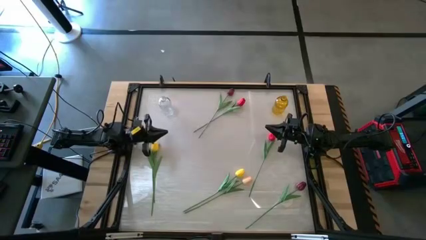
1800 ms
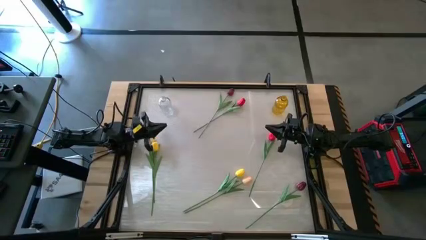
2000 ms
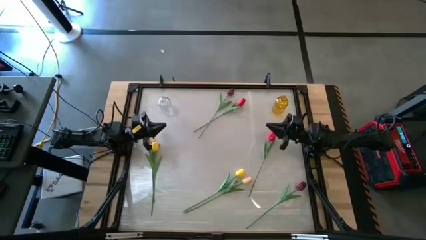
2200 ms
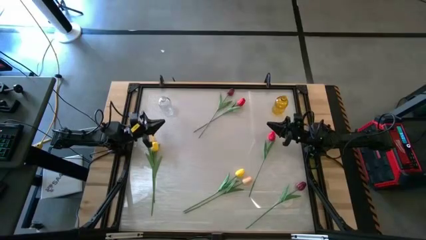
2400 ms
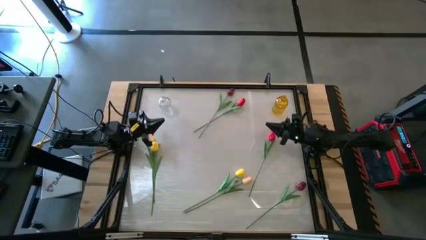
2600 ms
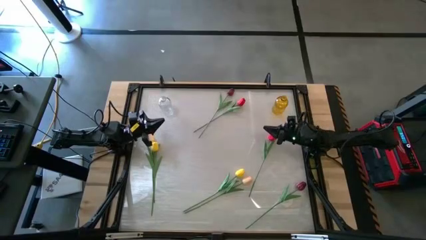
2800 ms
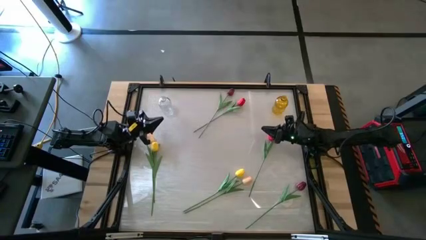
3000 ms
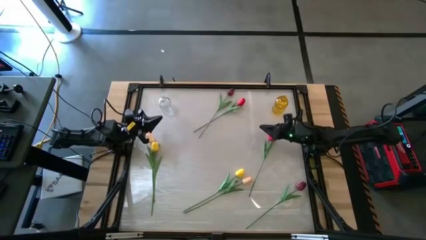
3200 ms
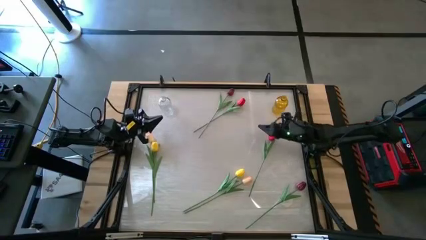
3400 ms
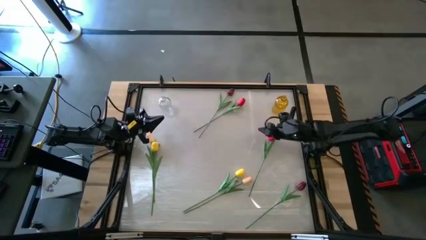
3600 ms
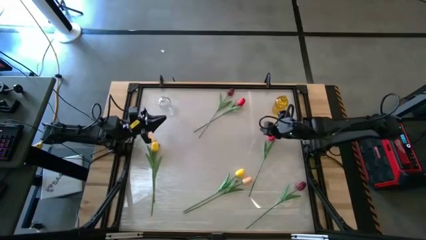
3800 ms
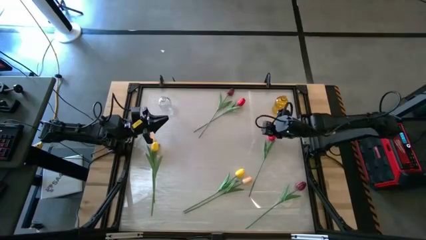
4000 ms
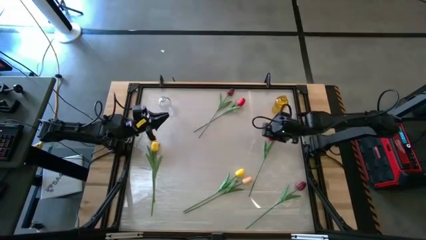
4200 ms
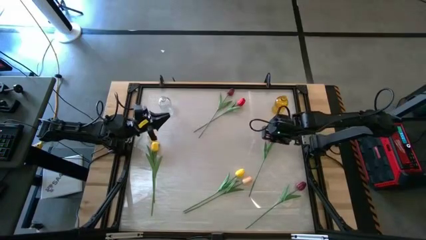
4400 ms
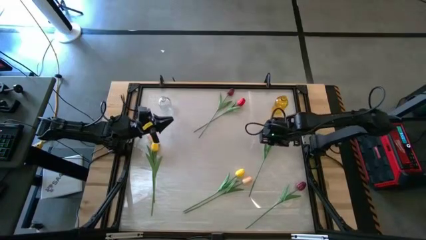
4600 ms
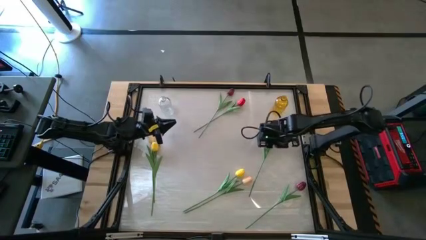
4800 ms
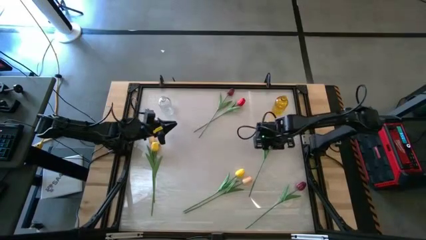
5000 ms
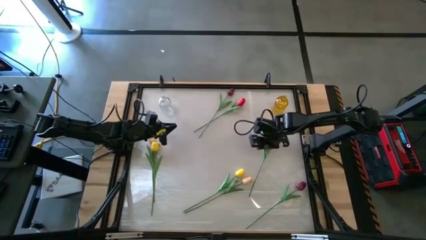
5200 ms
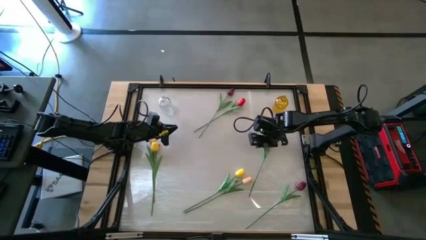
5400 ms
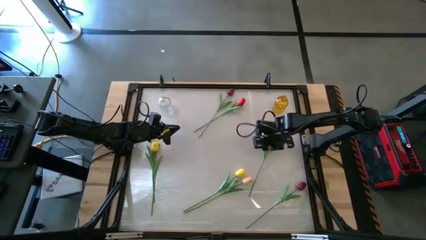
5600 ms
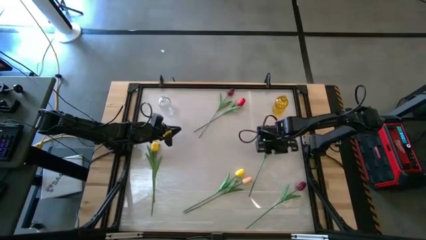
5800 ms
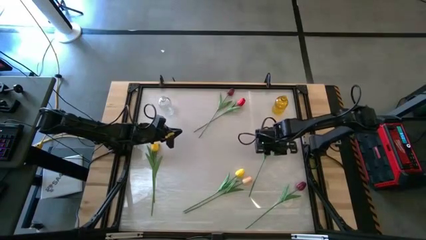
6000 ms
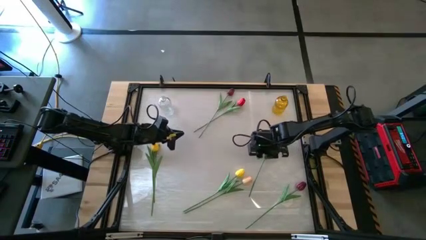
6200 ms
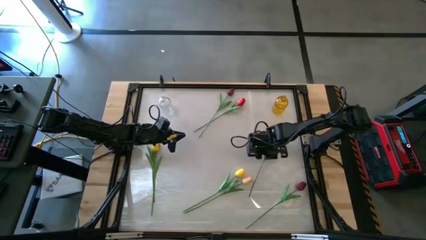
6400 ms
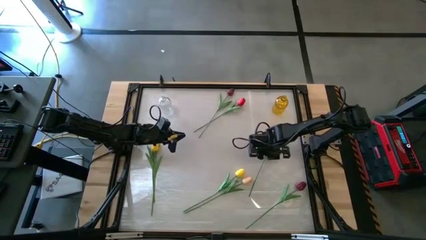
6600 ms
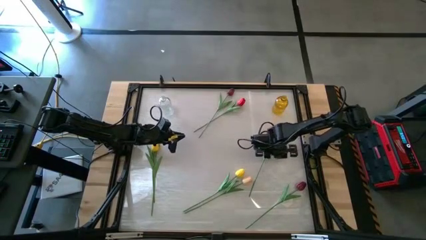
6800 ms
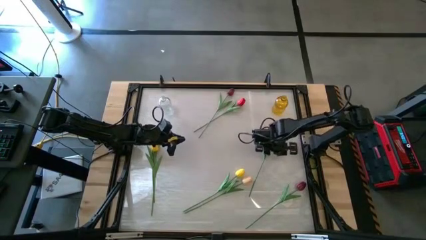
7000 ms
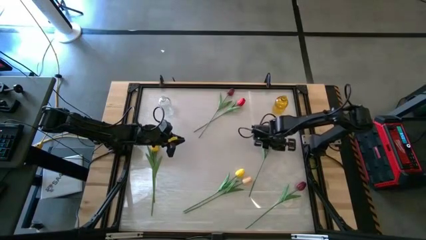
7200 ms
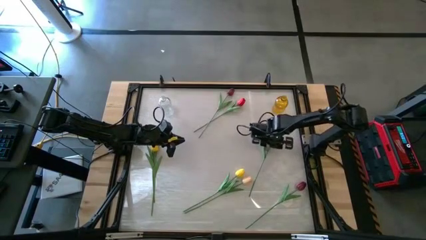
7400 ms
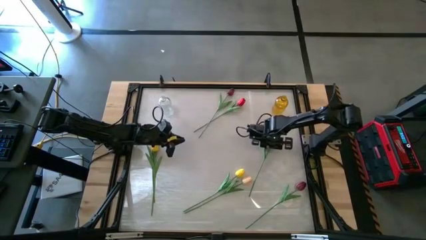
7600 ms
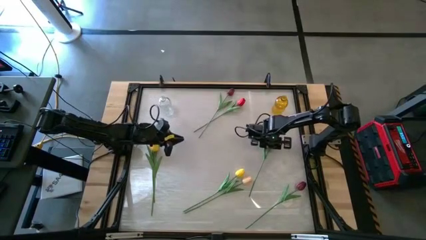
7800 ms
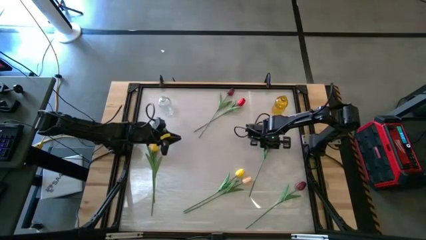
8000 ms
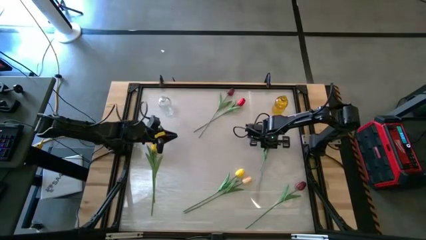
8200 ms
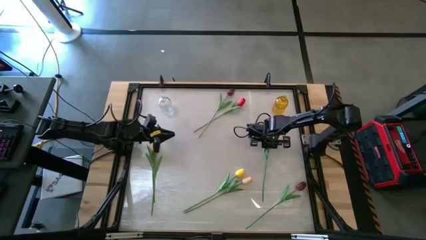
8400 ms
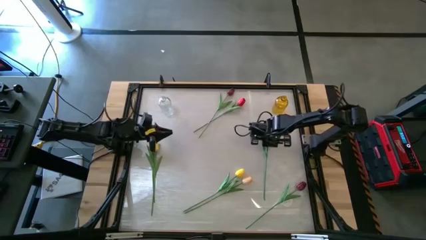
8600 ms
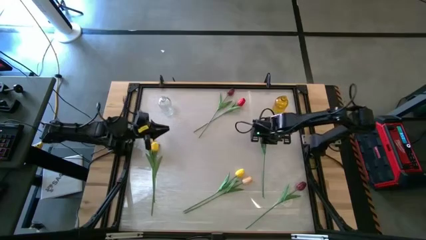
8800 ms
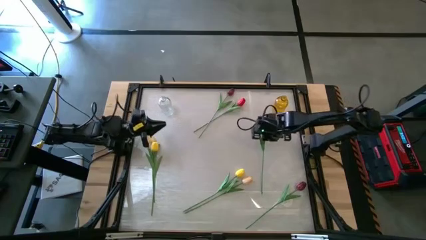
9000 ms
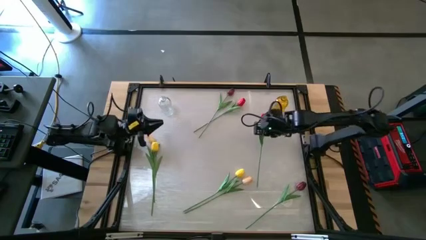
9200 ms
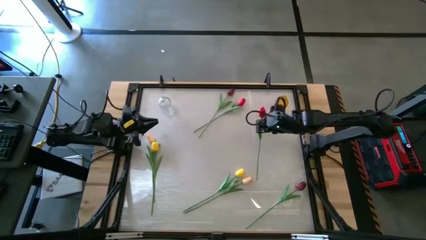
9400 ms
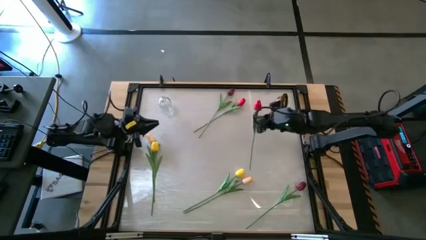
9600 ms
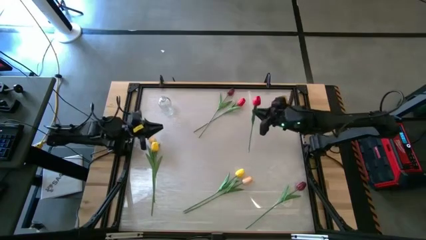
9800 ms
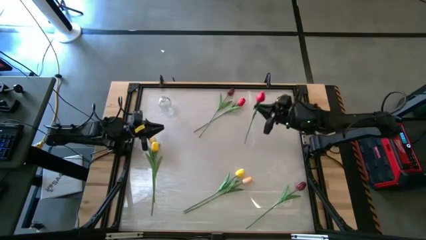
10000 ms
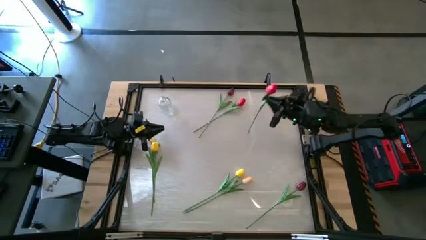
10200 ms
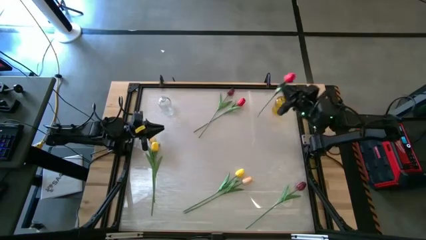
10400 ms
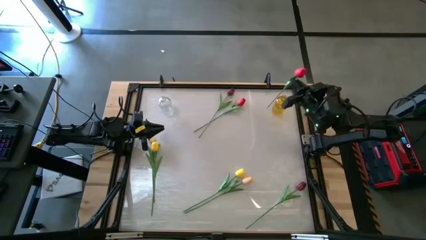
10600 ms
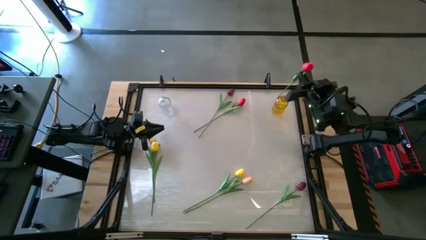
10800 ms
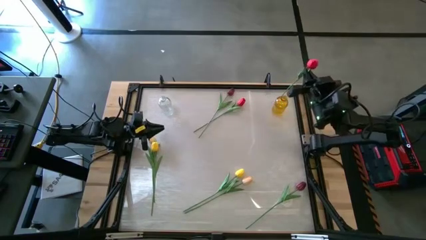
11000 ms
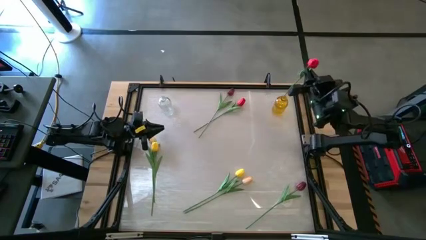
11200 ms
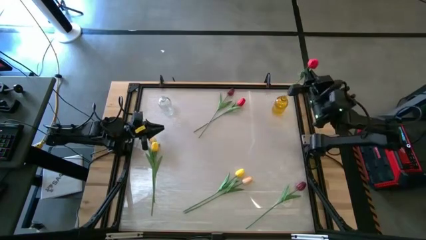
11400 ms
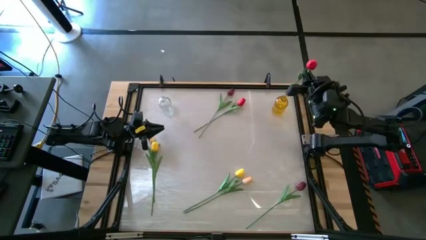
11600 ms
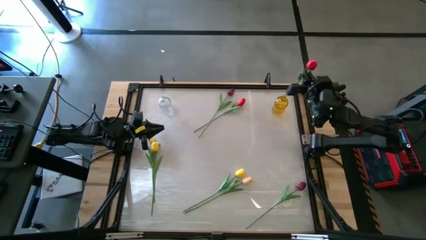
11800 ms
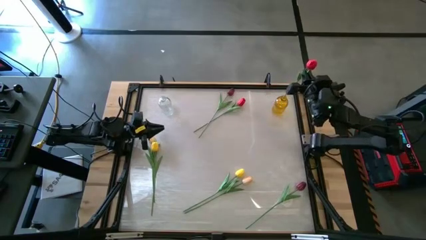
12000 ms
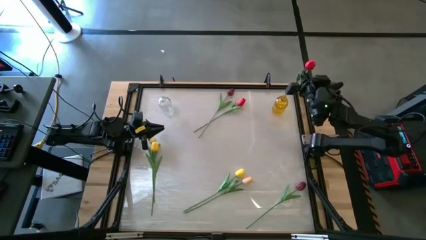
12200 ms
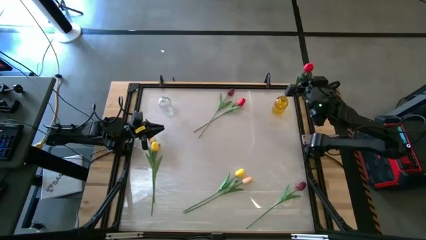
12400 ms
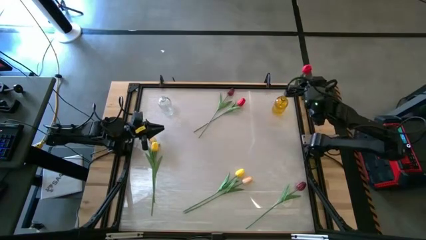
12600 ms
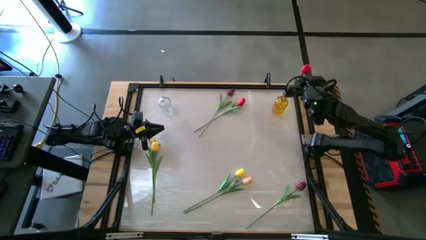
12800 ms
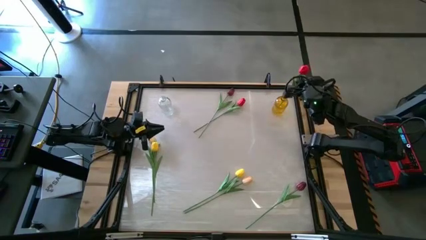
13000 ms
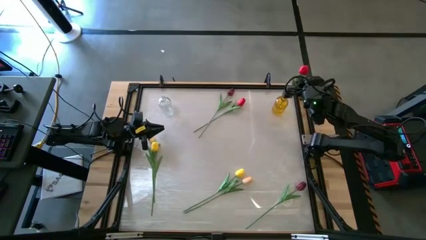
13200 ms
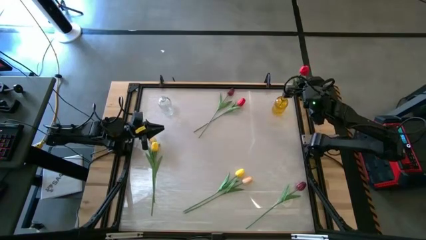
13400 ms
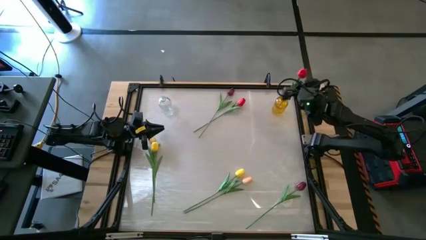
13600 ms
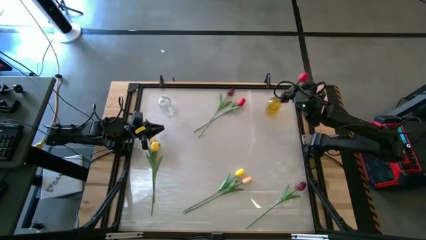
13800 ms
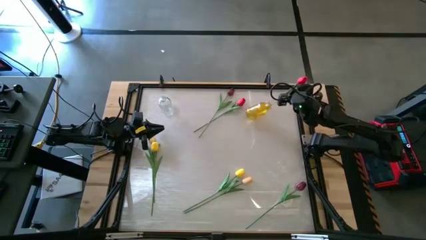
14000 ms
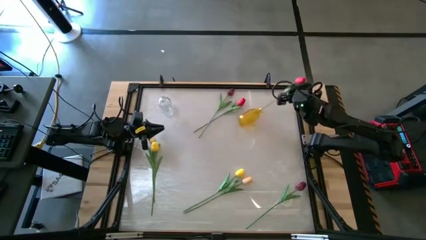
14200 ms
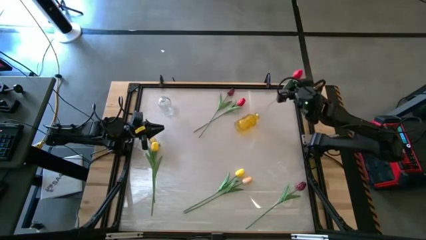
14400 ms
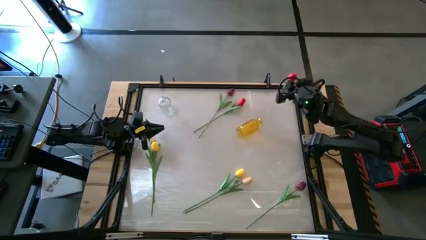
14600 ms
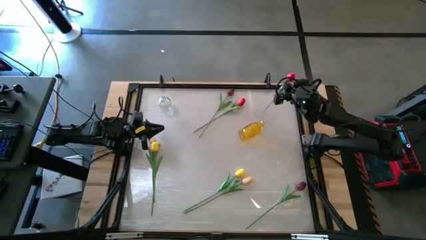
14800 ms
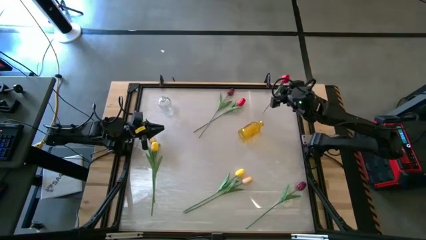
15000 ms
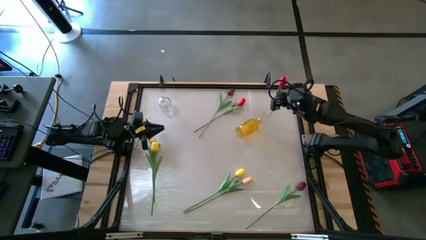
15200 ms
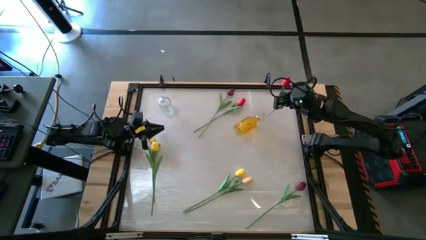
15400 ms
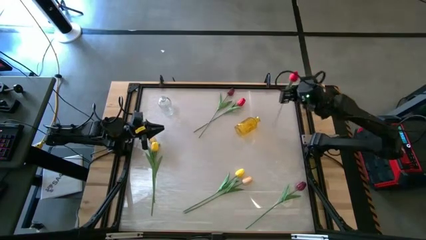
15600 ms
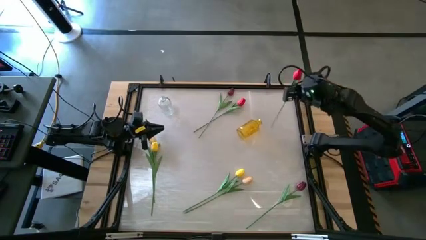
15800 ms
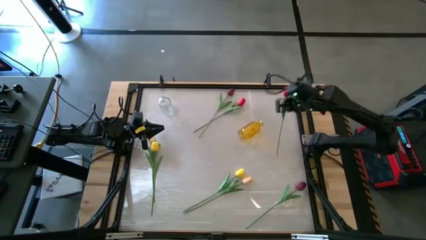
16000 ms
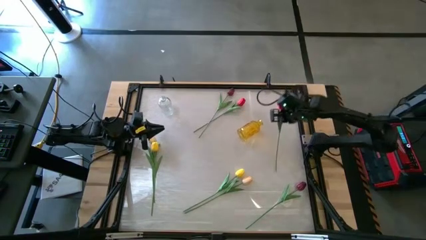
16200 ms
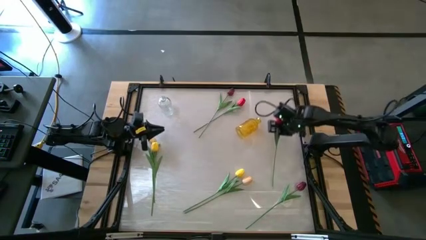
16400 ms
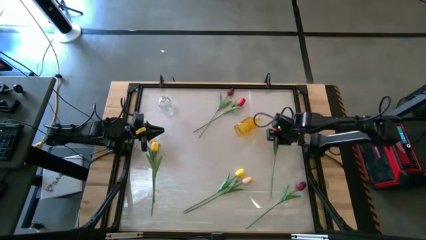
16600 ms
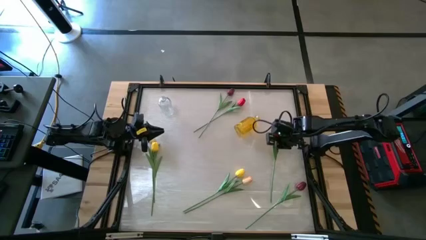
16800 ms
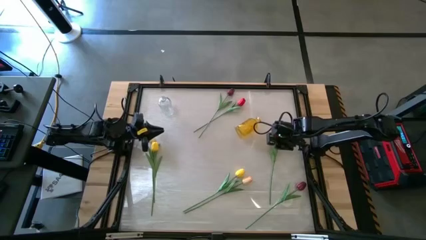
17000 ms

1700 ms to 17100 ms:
Task: Sort flowers into vase by color
Put the bottom red tulip into the yellow vase
